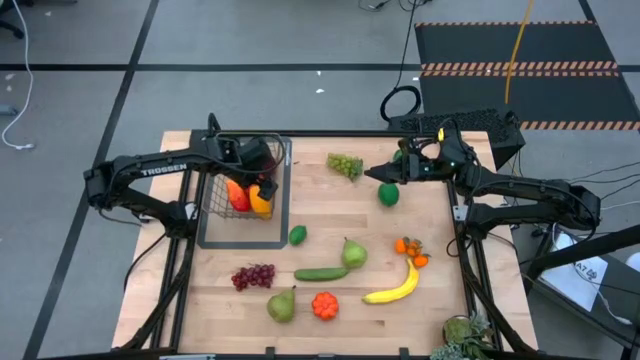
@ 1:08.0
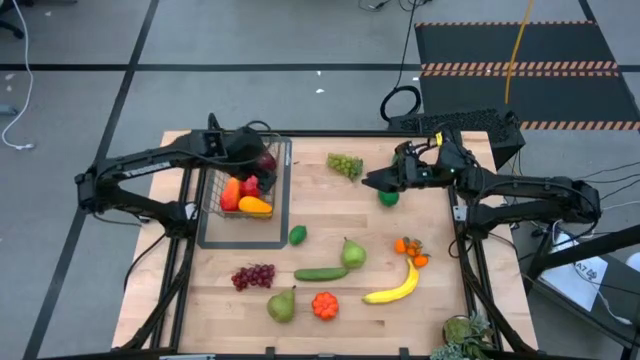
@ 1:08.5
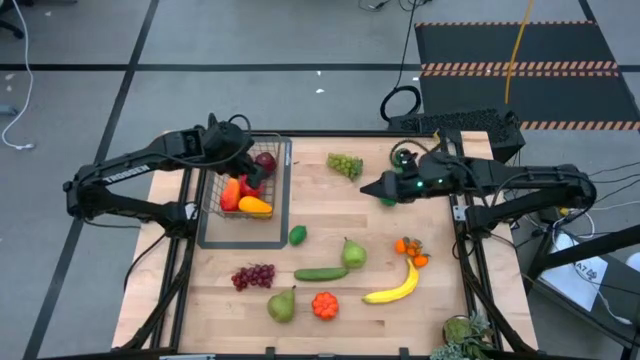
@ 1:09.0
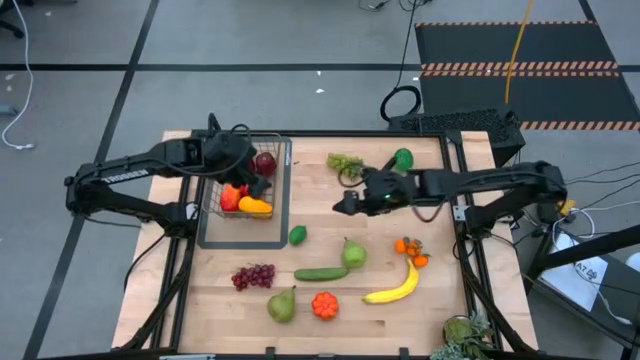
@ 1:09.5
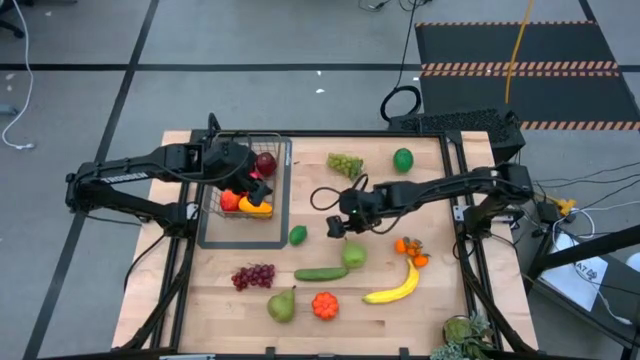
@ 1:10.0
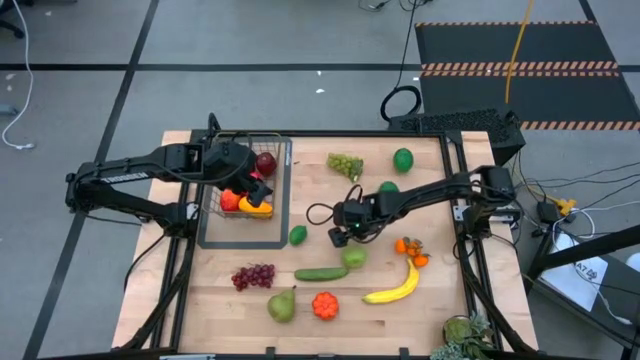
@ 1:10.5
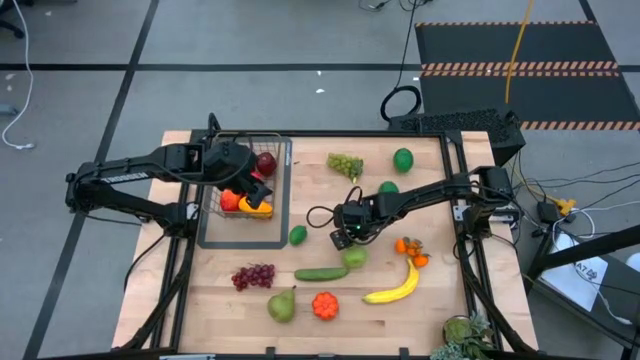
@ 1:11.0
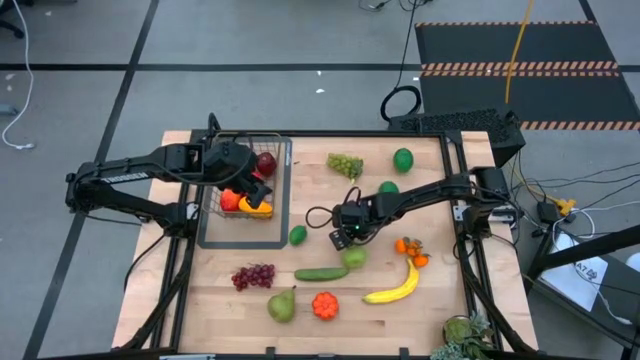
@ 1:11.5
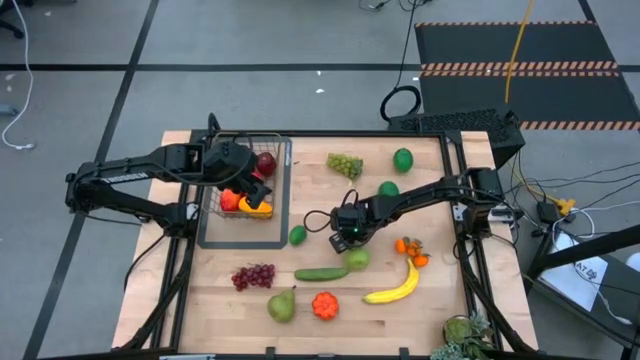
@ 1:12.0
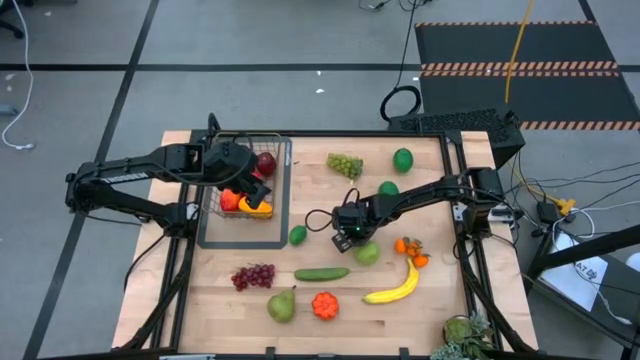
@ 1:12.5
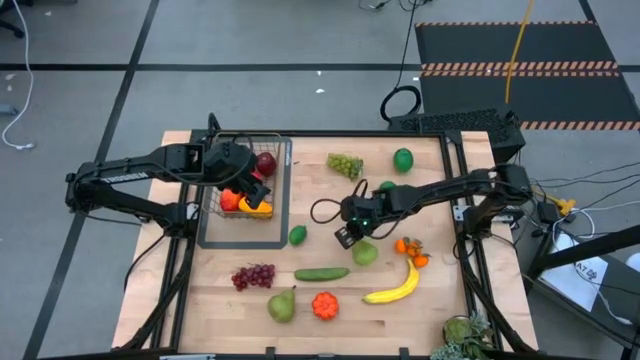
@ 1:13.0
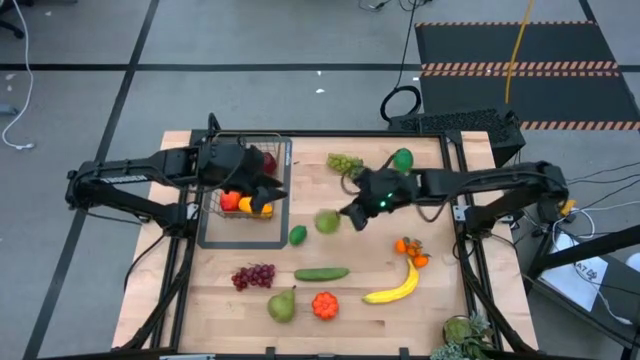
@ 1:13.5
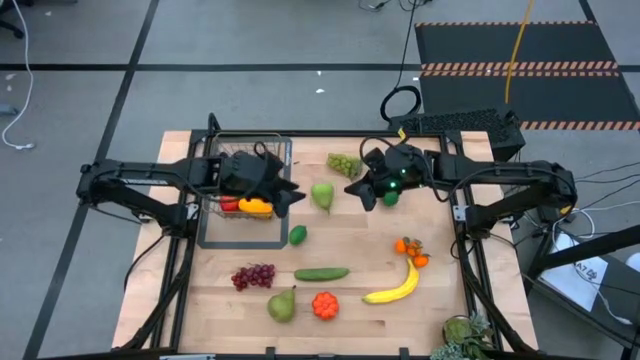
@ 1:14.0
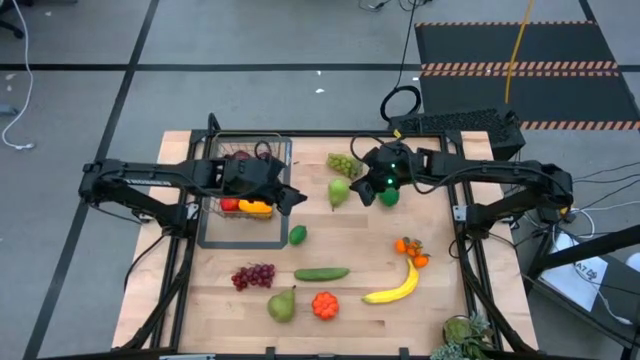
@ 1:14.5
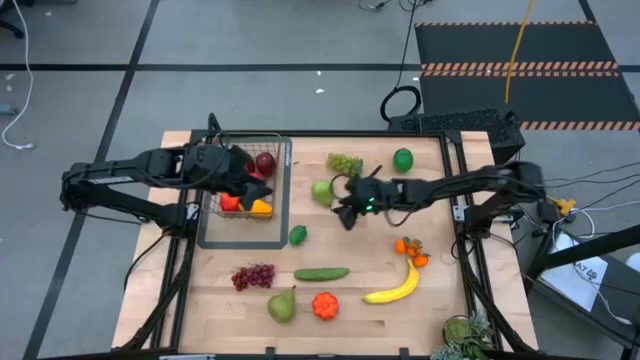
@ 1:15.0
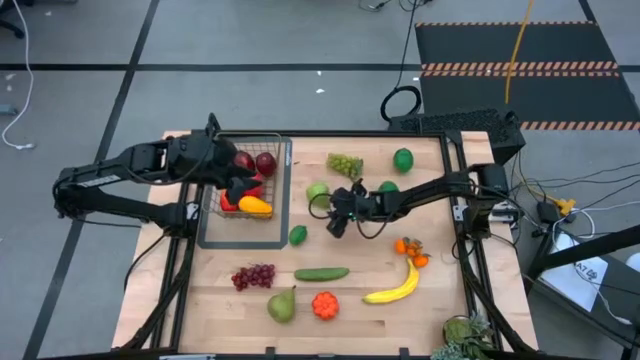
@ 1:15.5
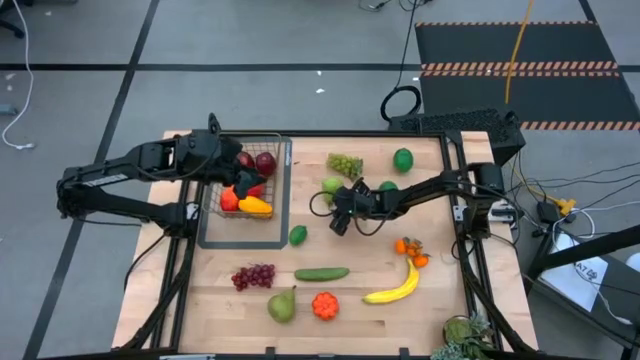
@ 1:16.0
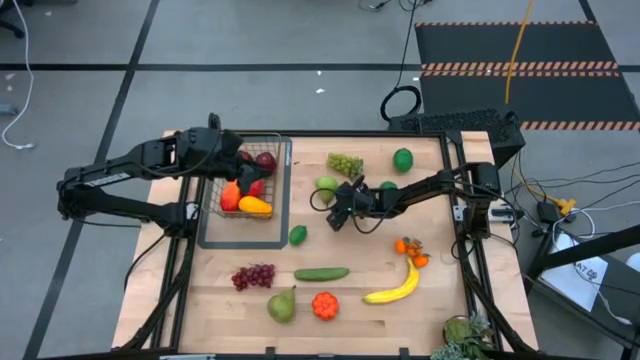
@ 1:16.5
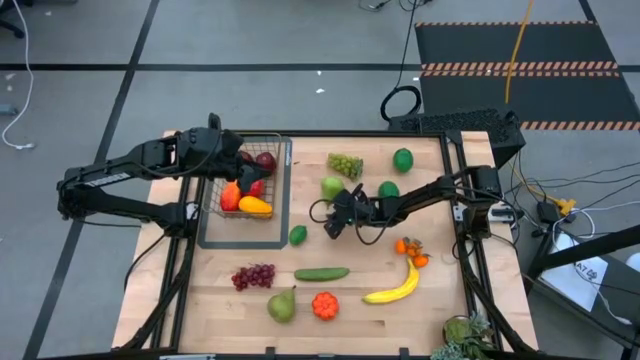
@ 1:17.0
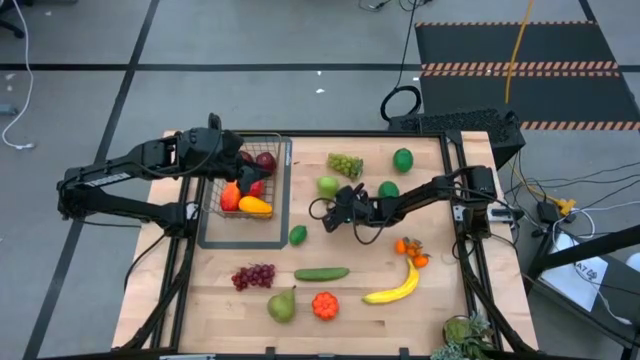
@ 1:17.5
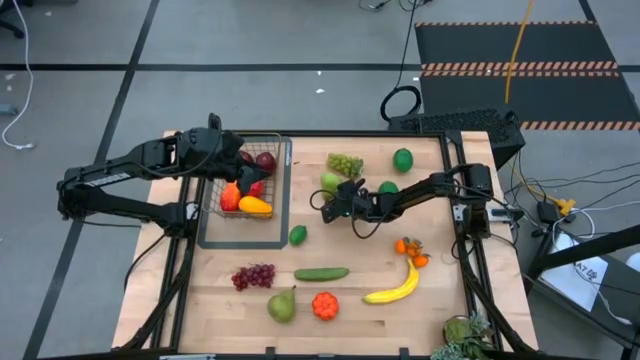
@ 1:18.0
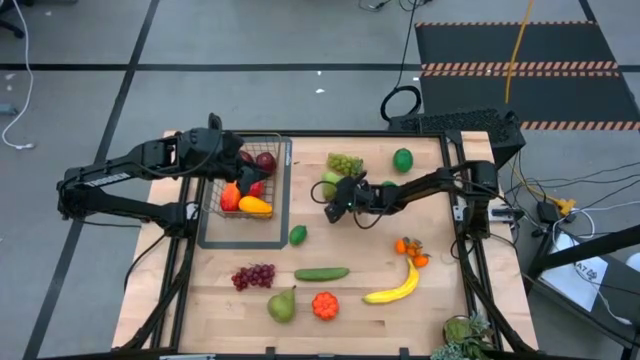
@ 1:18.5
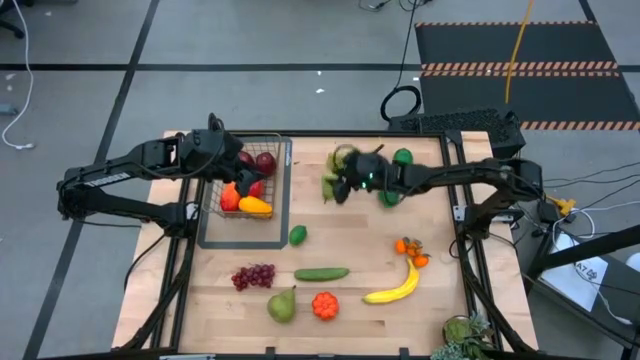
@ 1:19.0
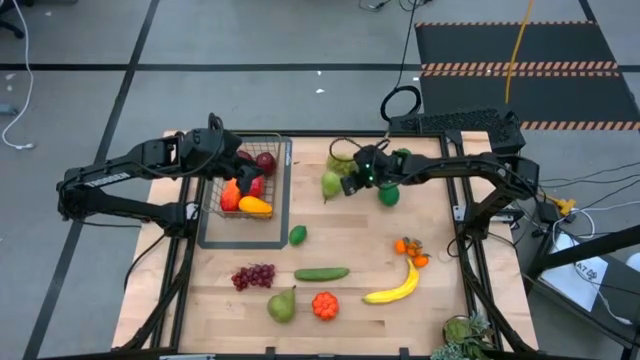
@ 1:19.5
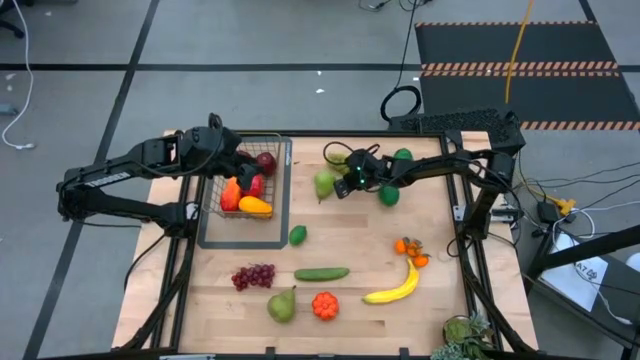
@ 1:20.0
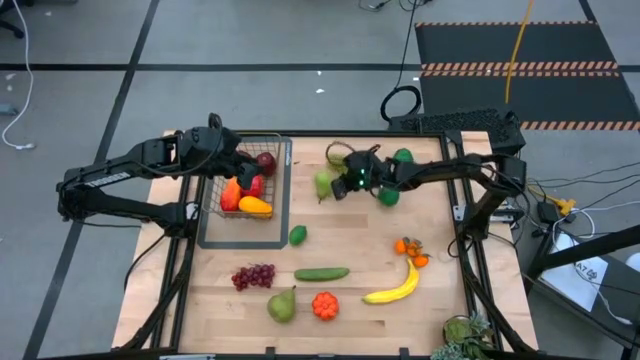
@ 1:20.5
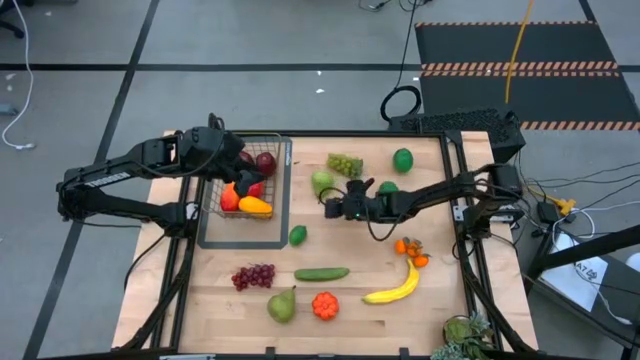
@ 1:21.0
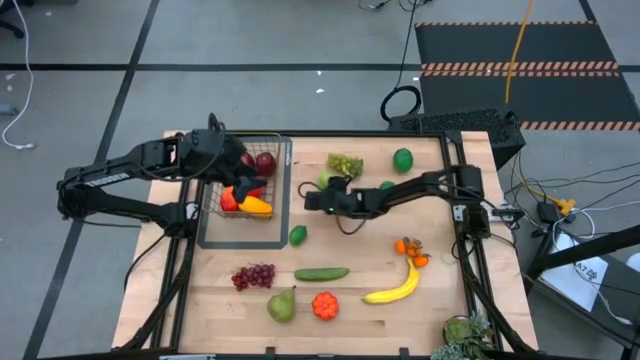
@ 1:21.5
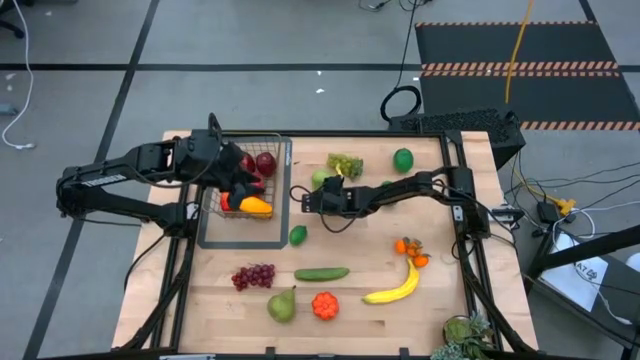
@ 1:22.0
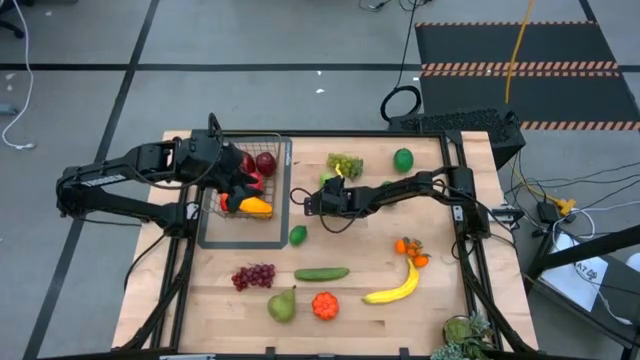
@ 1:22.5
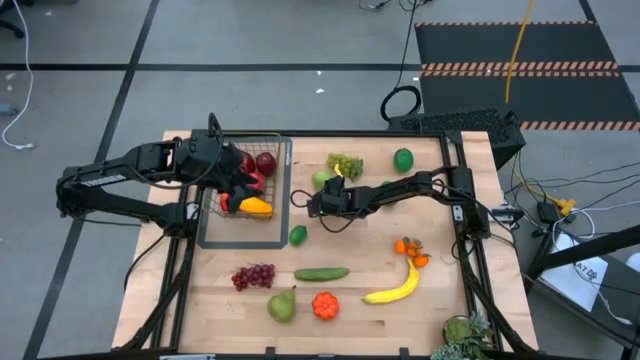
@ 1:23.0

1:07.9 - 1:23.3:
Task: Build produce basket
Put the top pear into the wire basket

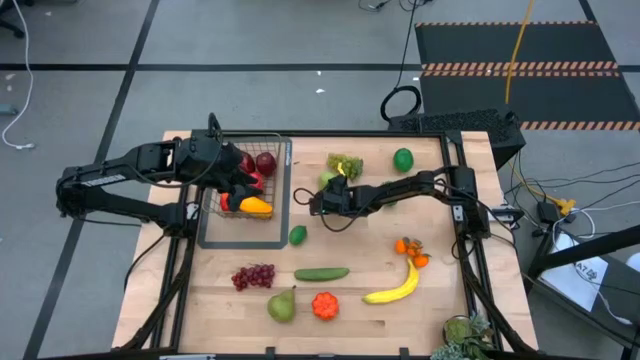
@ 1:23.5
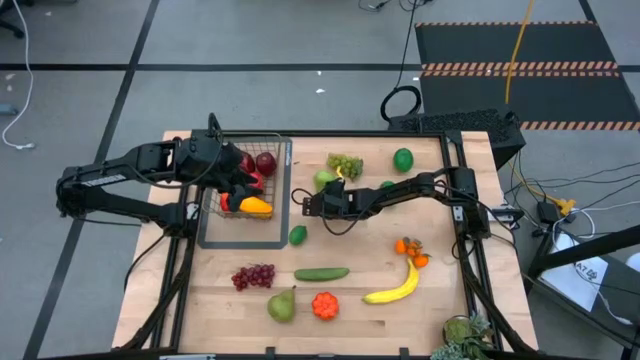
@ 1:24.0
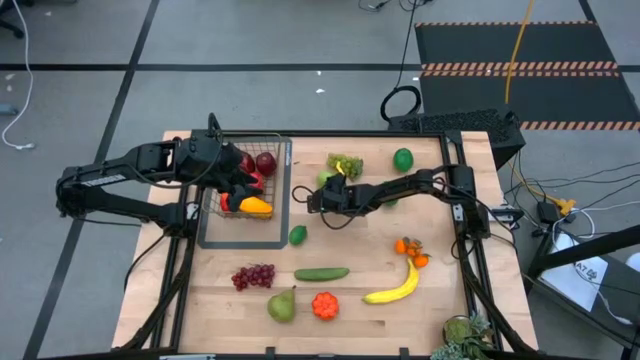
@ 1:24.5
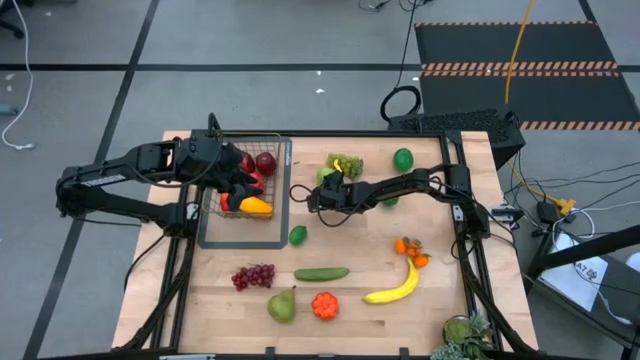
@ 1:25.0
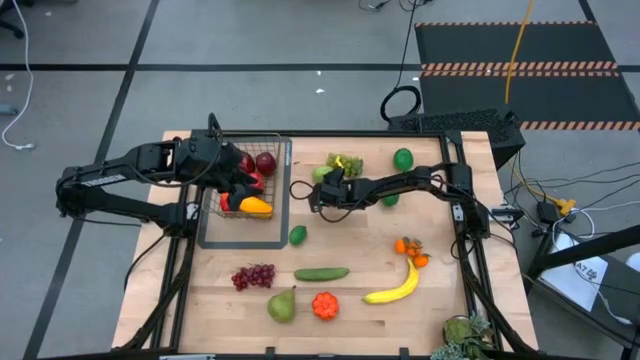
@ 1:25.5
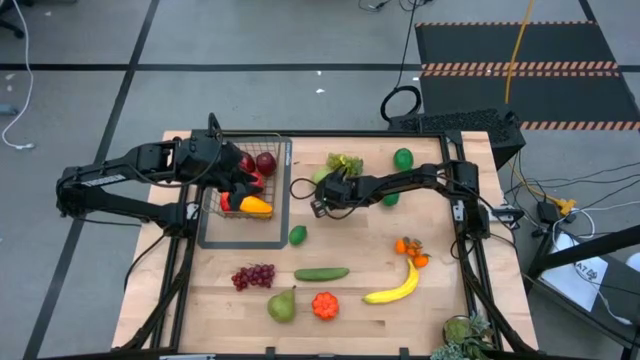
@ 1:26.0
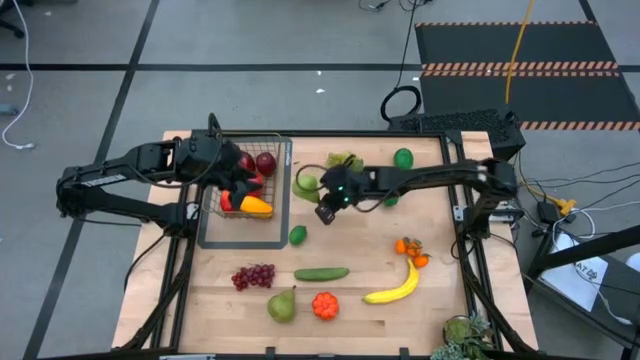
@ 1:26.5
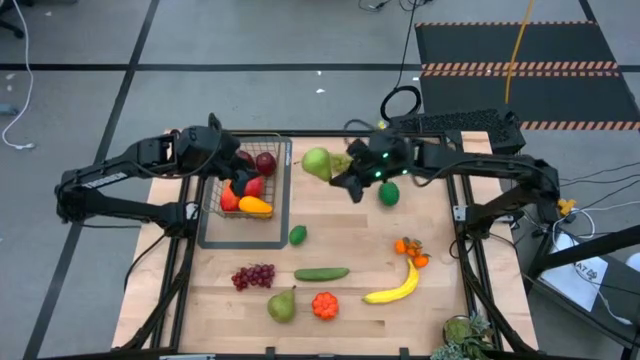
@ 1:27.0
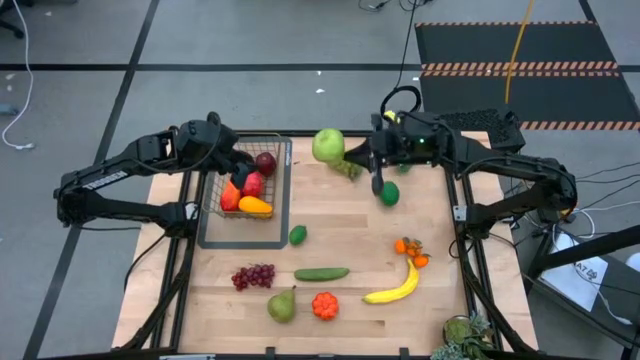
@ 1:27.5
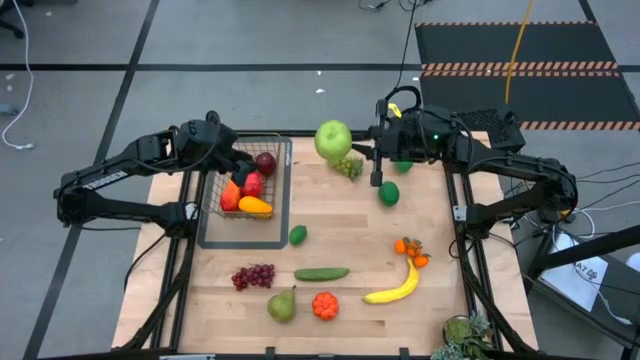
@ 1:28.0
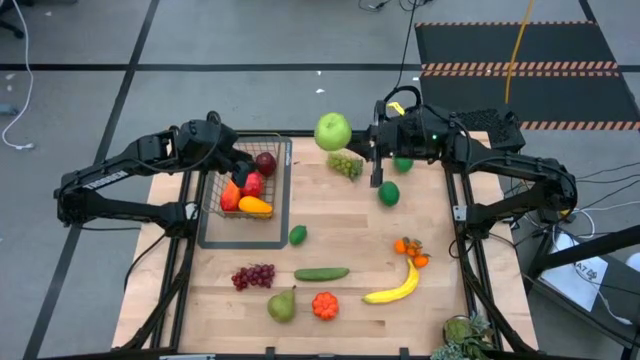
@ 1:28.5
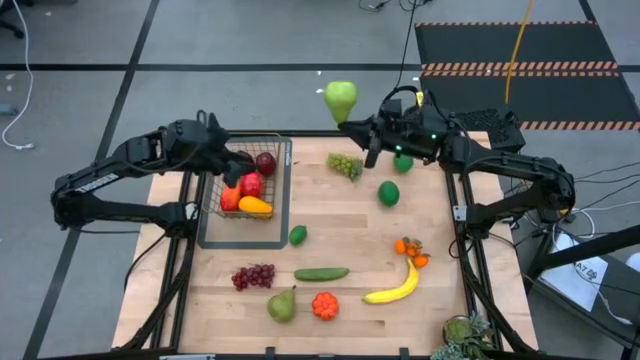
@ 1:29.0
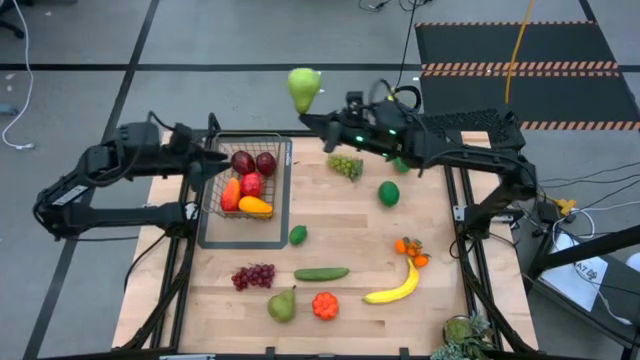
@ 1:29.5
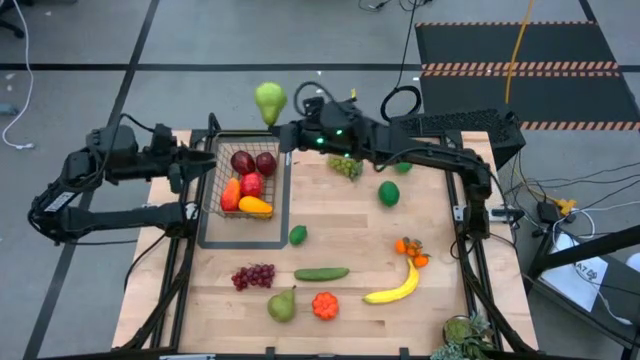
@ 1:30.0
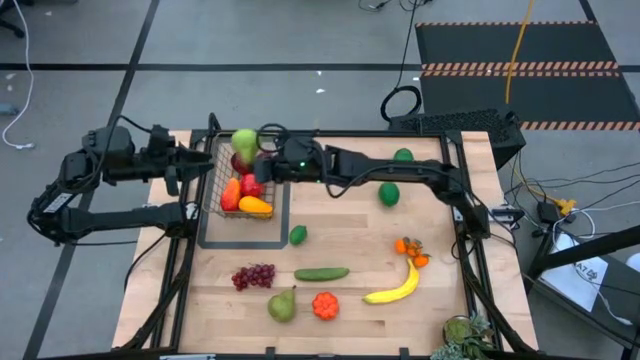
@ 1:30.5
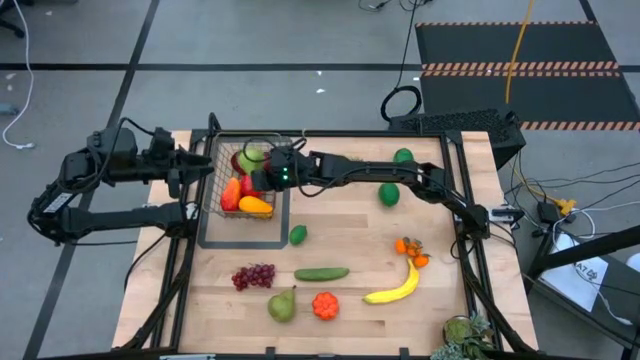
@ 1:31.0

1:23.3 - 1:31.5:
Put the top pear into the wire basket
